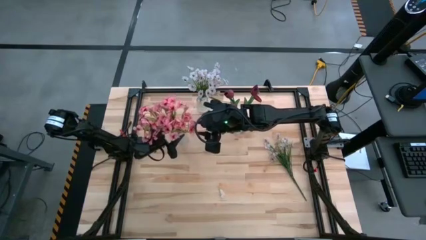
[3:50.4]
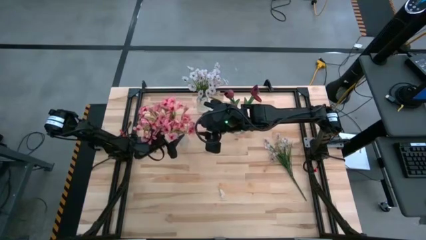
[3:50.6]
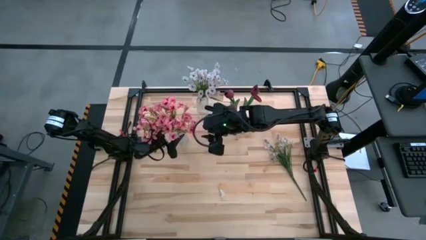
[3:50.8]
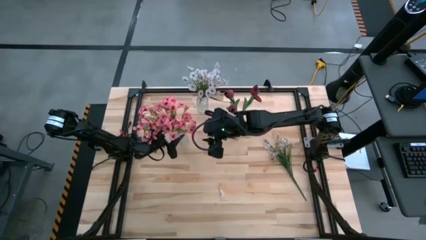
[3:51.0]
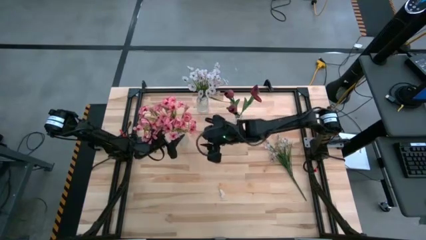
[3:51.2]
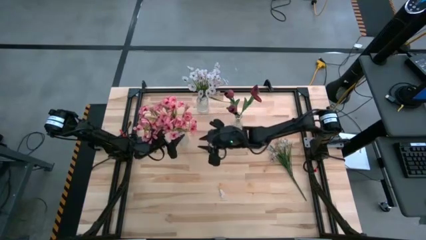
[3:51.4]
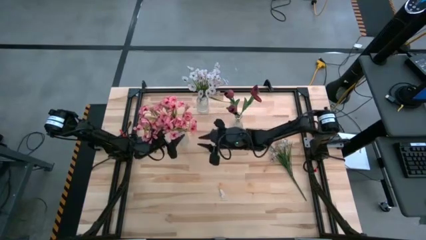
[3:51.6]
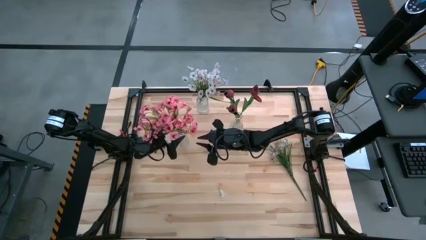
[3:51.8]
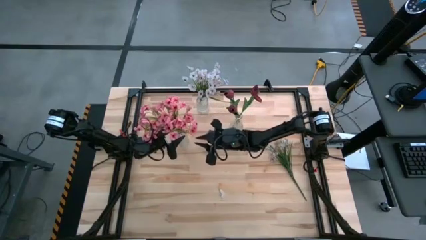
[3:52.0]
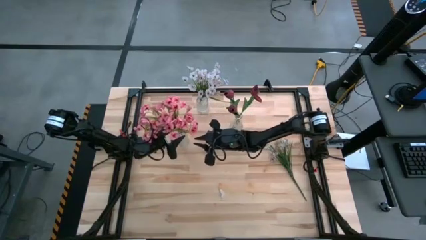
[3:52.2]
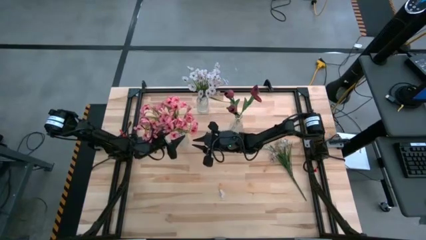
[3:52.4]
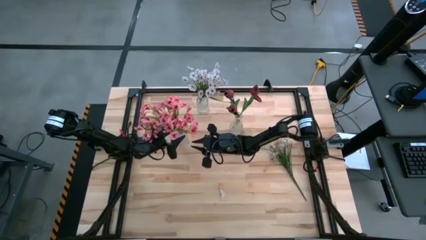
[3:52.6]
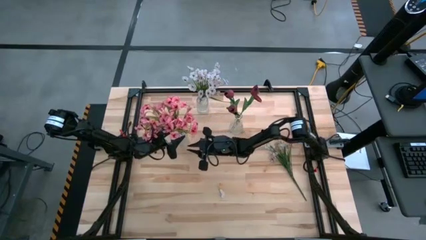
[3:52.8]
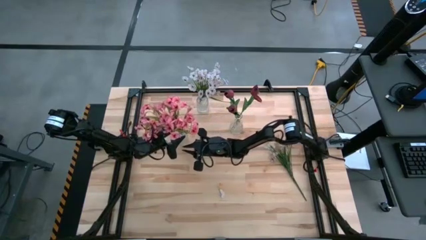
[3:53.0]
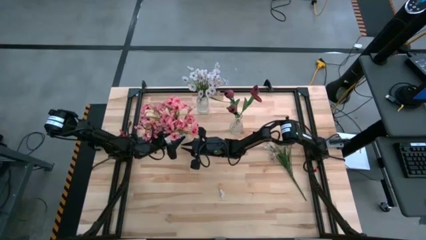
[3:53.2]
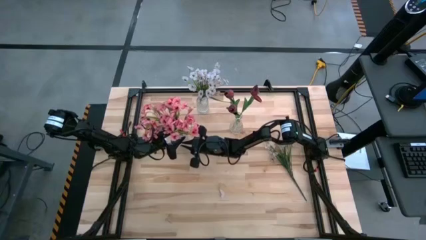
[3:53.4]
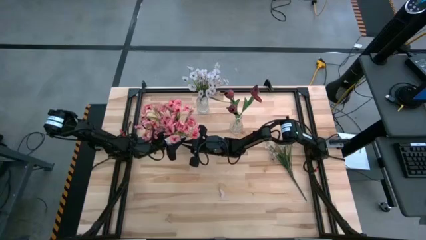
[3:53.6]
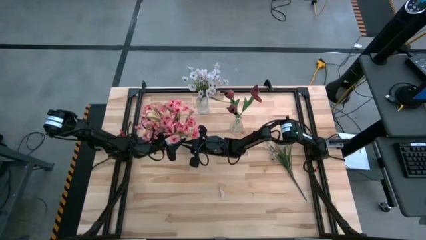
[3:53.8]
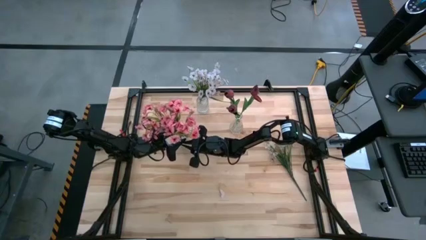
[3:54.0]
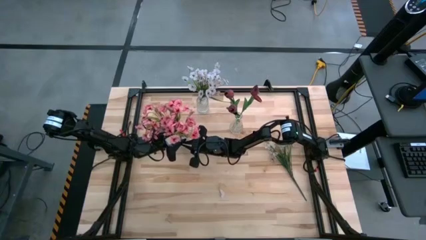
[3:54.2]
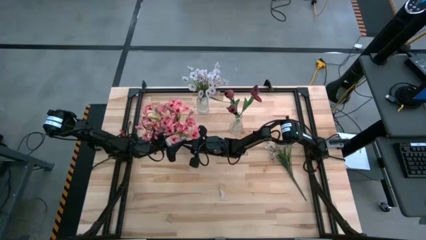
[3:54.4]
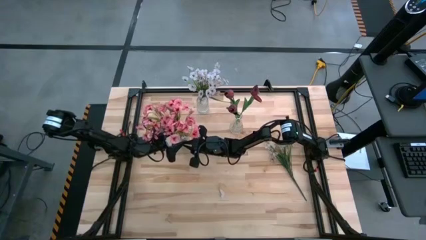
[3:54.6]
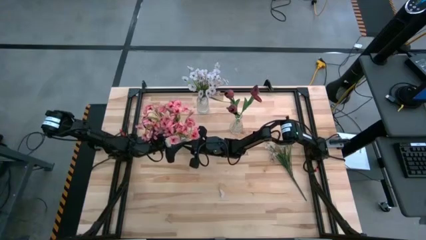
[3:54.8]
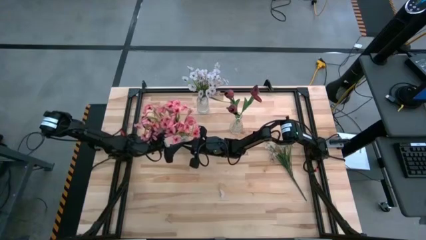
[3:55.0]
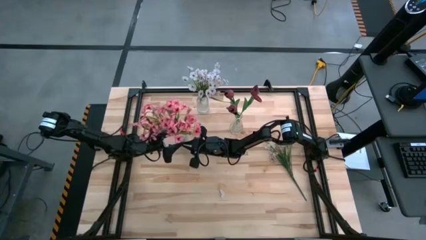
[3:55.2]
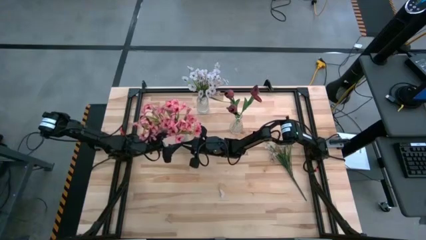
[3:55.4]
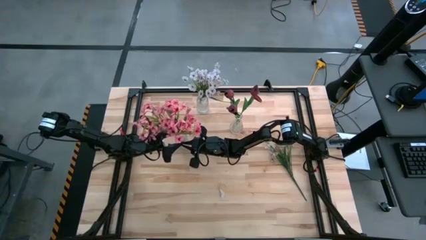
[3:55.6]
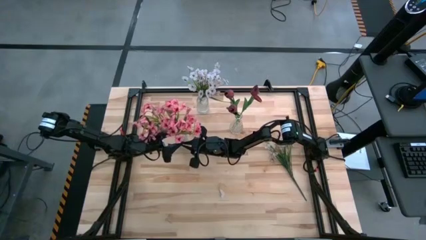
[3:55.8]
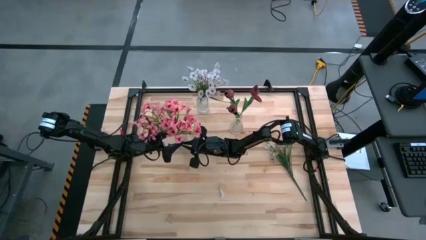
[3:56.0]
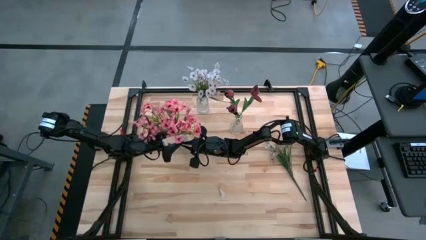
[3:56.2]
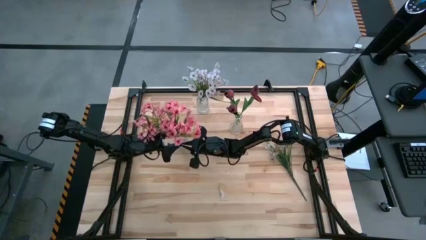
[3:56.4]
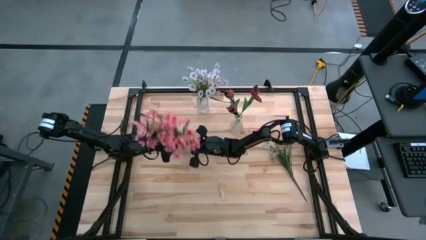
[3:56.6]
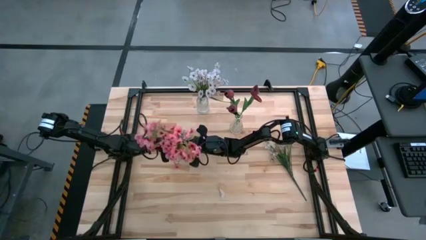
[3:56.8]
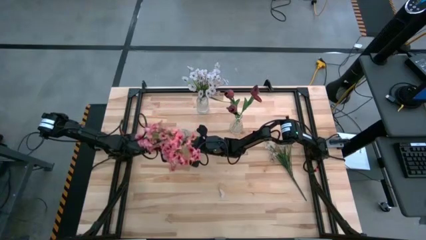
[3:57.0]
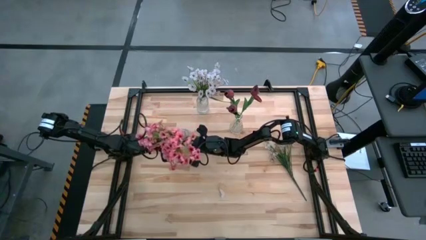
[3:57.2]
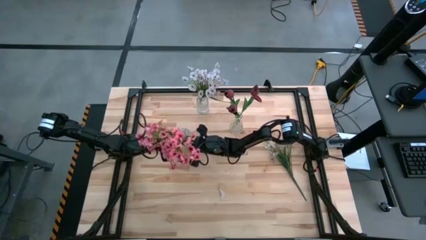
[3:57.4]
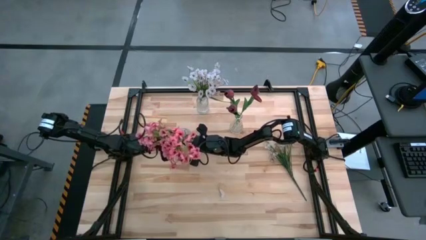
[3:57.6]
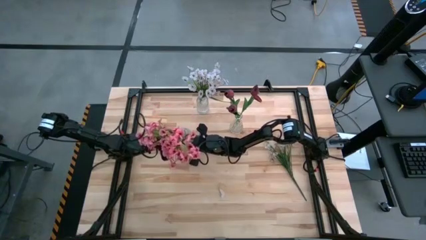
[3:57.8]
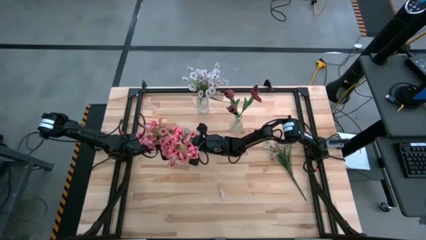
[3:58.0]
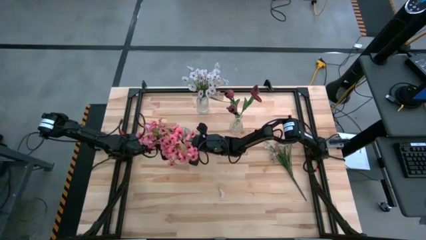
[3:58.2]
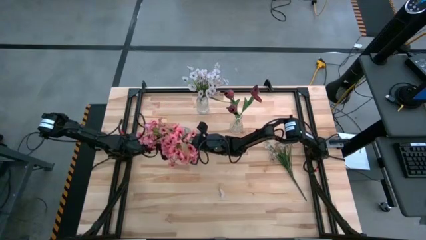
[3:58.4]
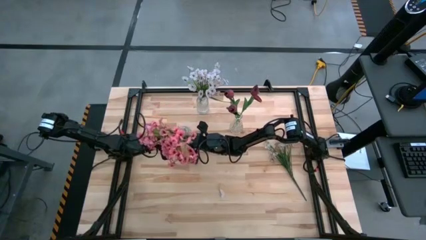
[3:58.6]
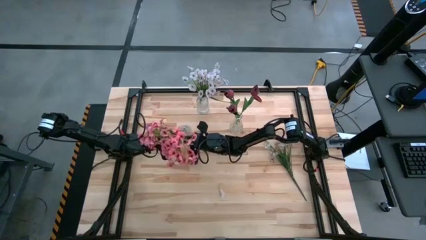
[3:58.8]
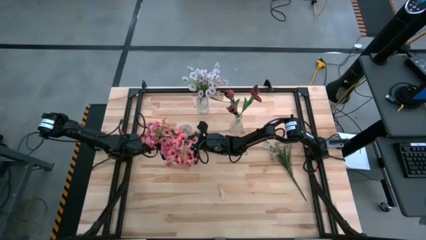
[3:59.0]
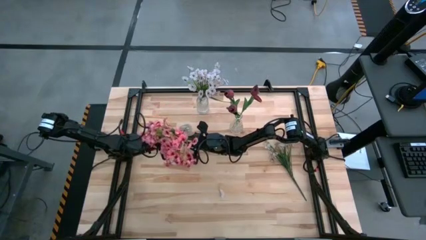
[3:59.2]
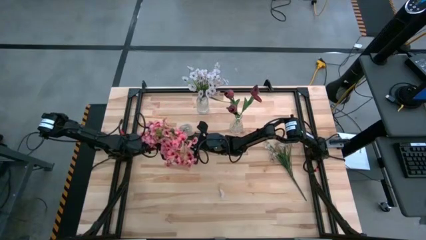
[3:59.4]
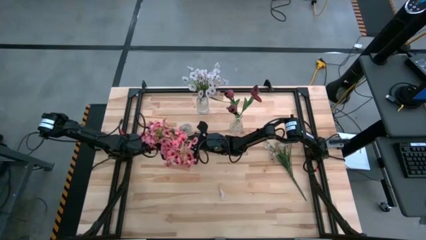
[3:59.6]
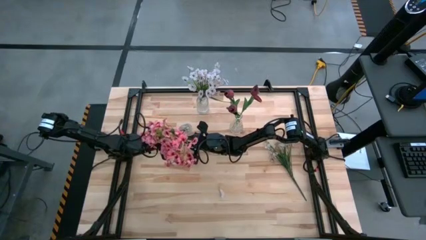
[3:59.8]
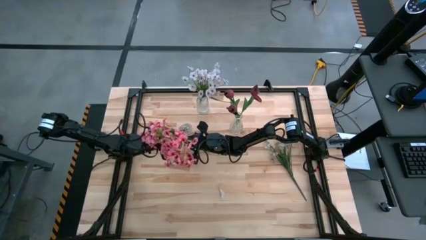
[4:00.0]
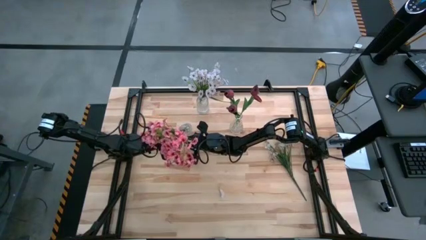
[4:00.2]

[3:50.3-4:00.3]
Task: Sort flowers into vase by color
Adjust the bottom left transparent vase

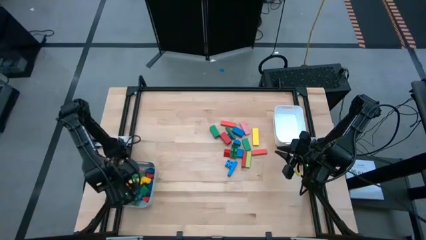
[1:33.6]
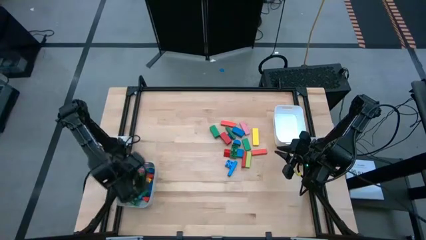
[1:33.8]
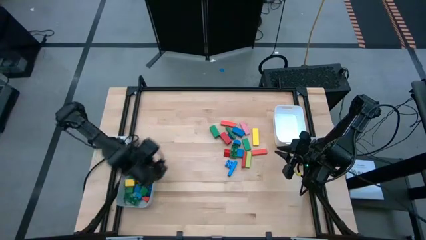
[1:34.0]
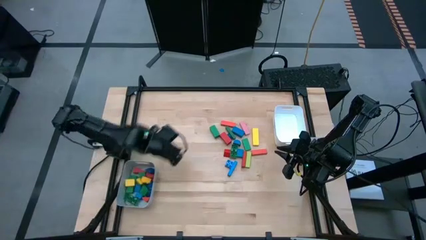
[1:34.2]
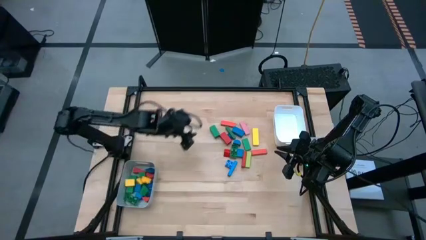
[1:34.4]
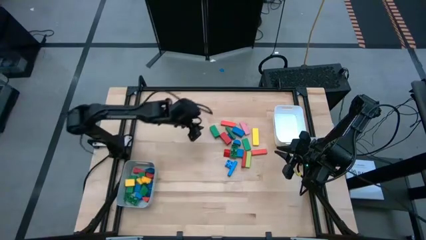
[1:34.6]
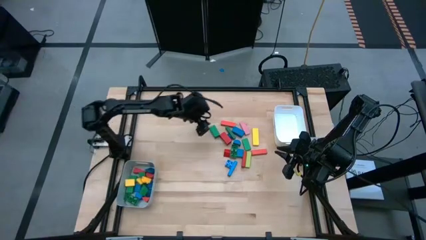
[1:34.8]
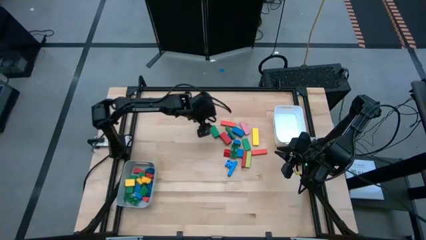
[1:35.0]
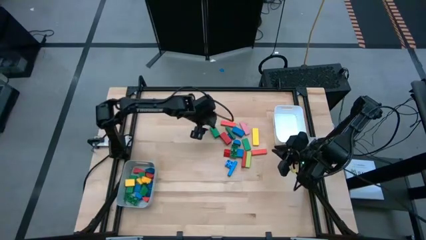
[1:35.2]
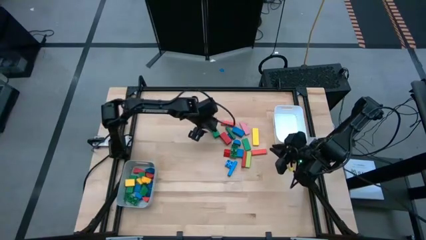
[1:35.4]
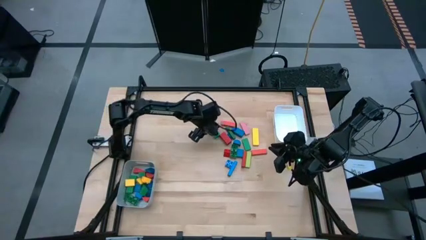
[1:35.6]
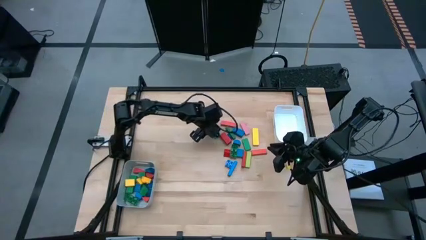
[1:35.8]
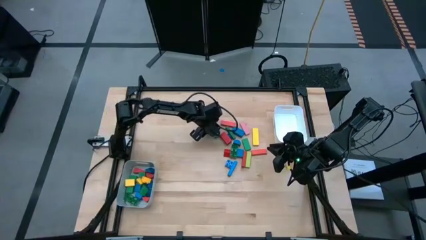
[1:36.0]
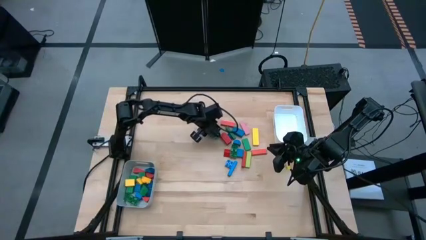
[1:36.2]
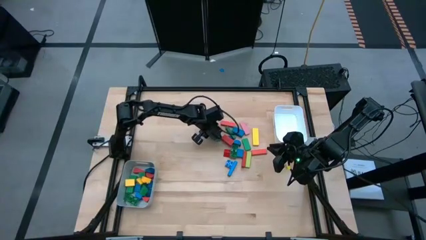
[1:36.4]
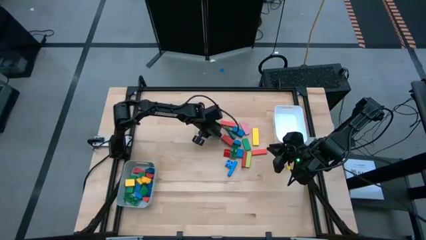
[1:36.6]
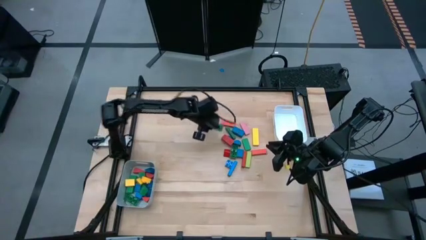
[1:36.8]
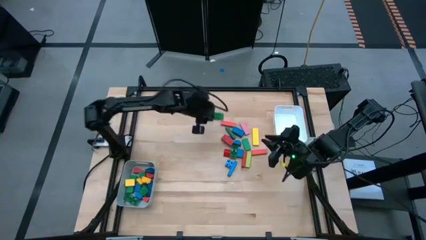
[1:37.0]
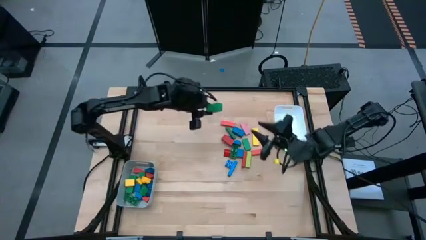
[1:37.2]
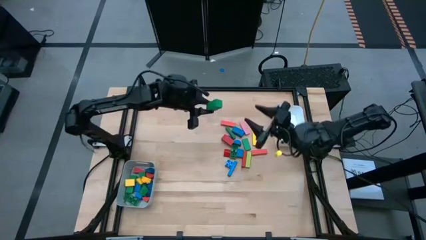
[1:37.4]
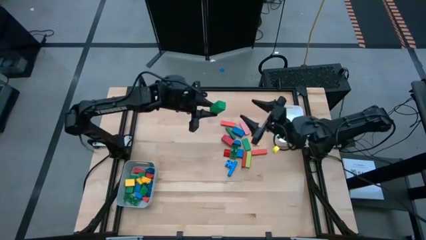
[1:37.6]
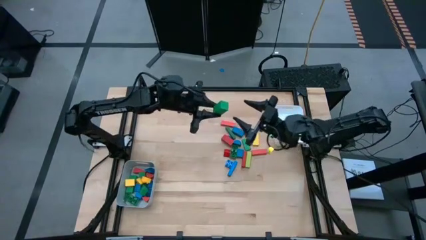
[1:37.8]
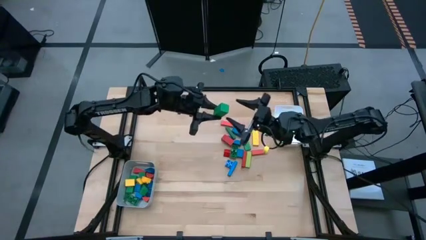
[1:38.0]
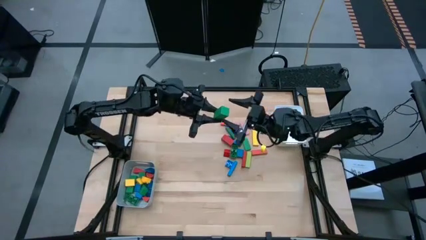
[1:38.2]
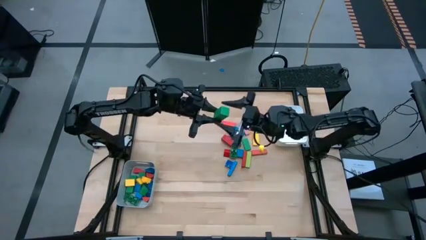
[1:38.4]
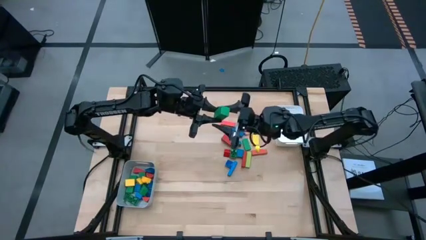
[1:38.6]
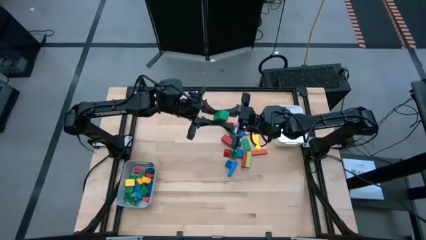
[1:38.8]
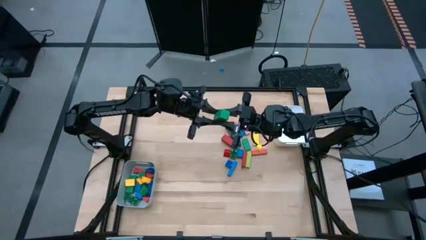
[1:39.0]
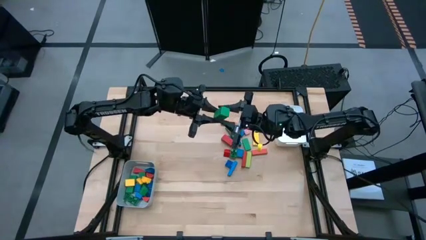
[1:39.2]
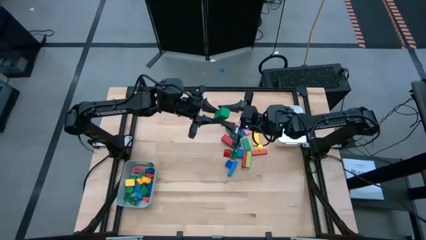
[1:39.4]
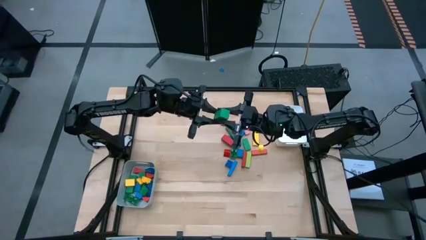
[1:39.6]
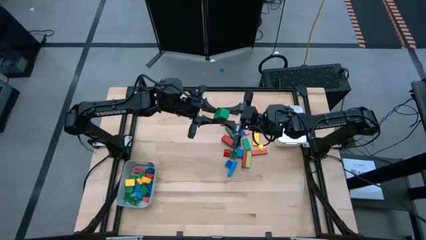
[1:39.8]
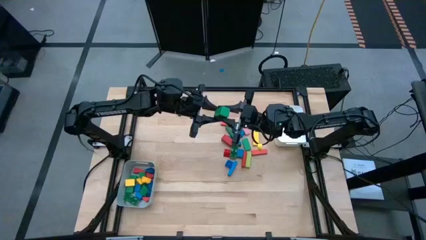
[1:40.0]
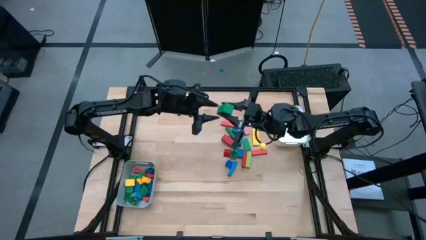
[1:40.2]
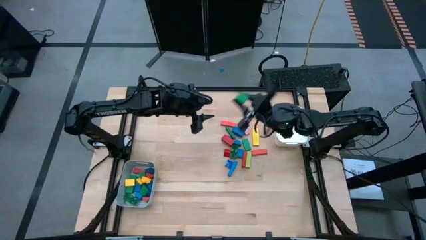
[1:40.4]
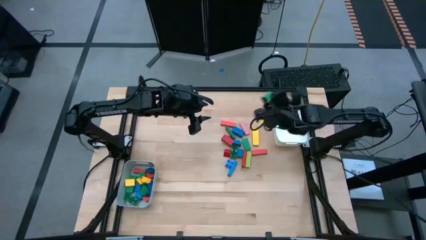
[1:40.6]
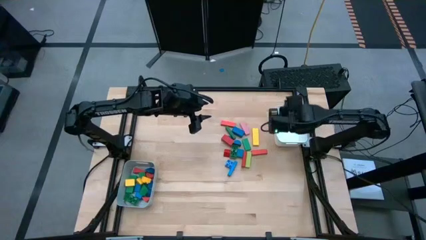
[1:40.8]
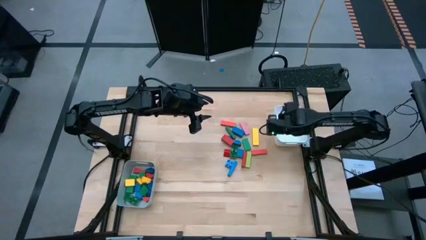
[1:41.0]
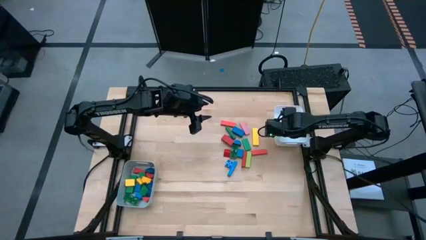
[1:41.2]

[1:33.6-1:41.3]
Task: Sort blocks by size
Put the green block into the white bin
